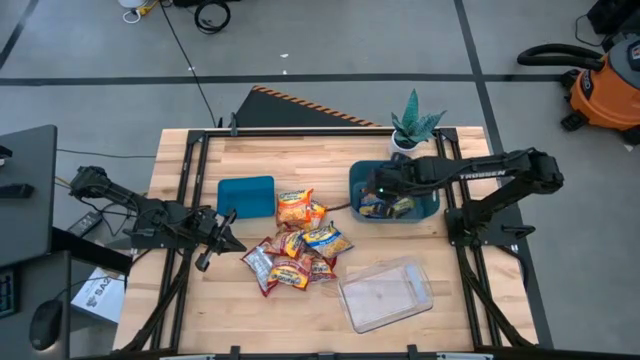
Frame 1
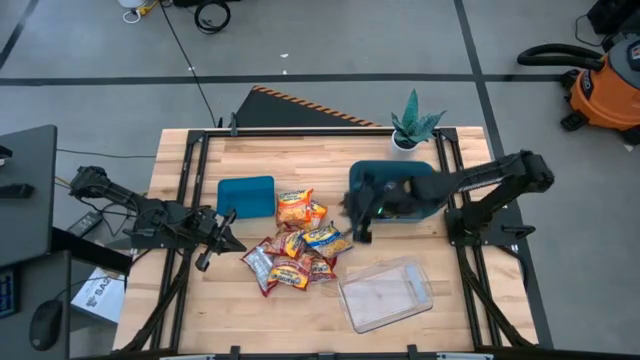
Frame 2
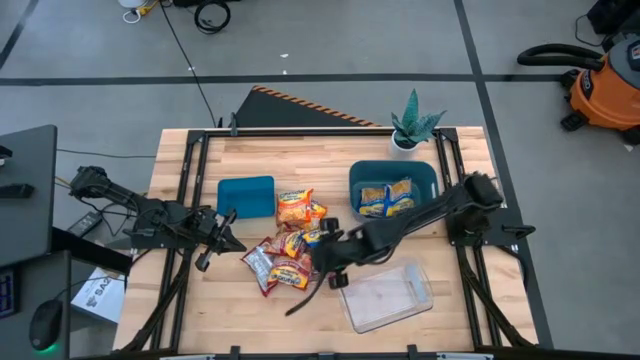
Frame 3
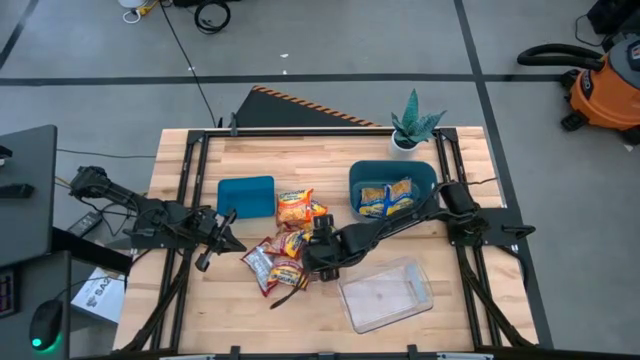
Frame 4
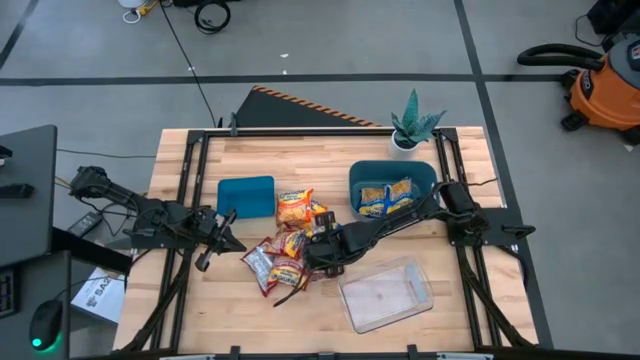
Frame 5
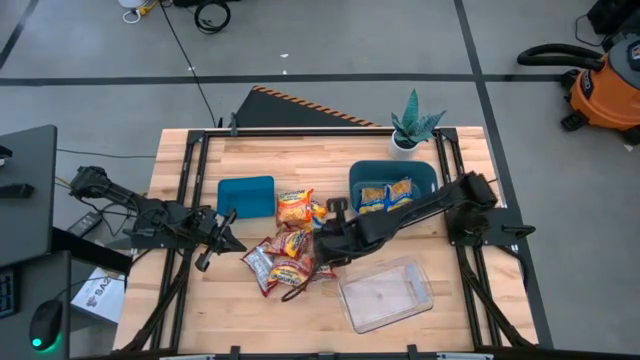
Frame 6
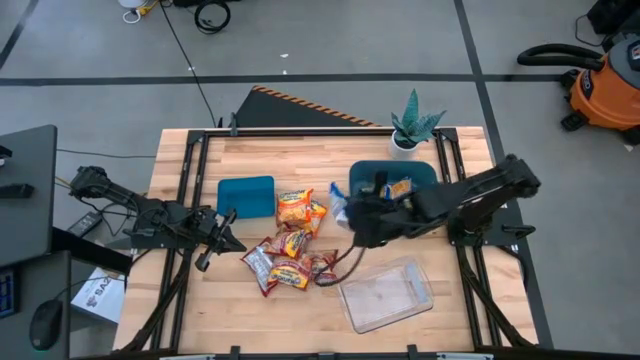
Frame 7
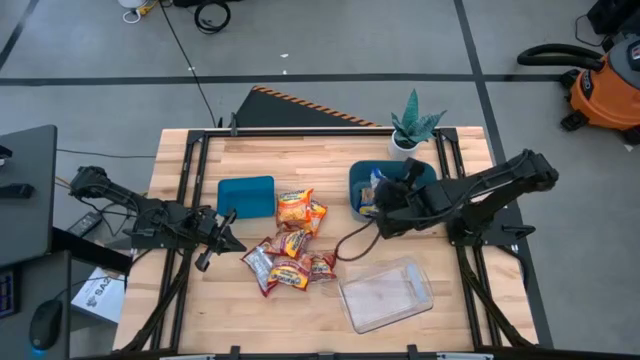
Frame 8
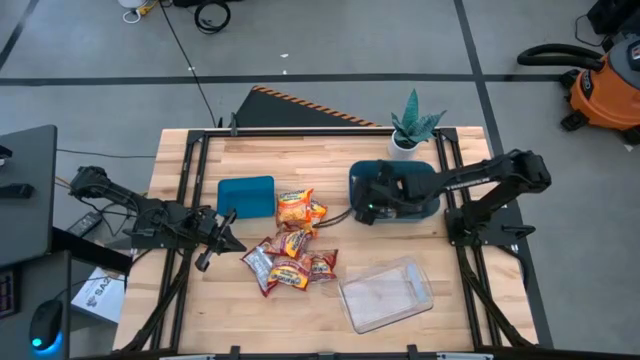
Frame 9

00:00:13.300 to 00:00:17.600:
Task: Sort Maruchan noodles
Put the blue noodle pack into the green bin

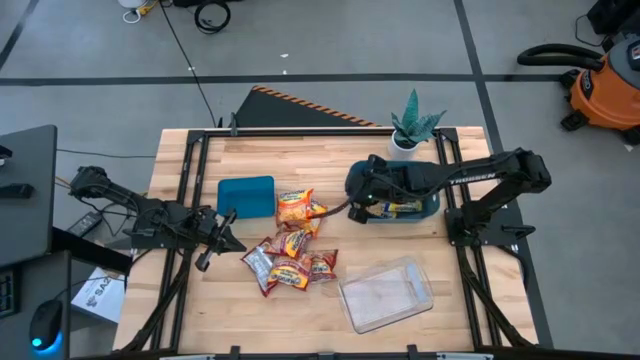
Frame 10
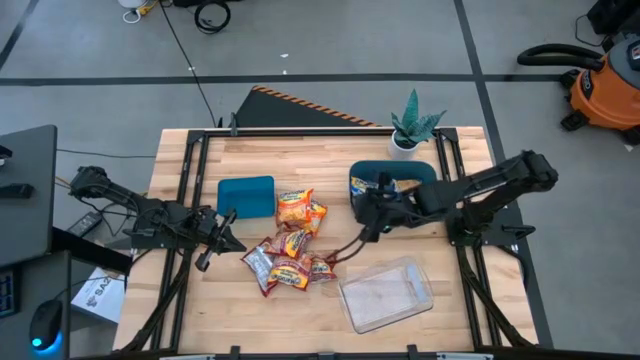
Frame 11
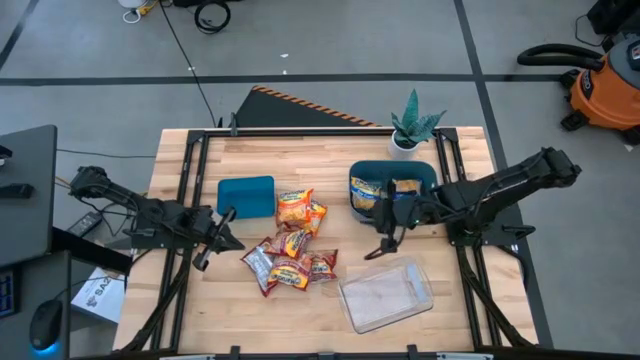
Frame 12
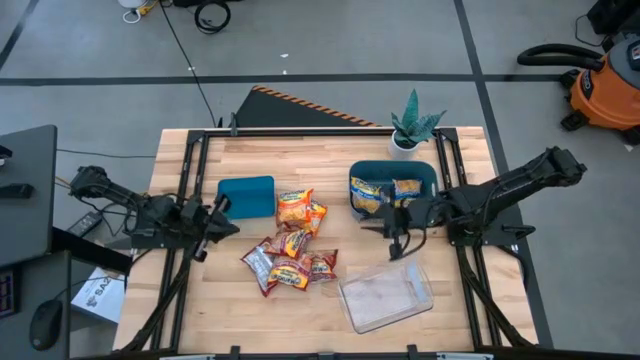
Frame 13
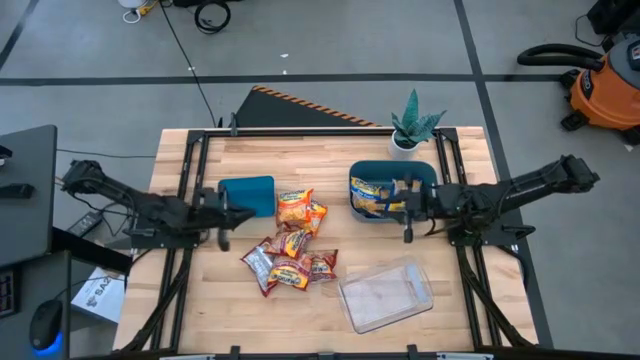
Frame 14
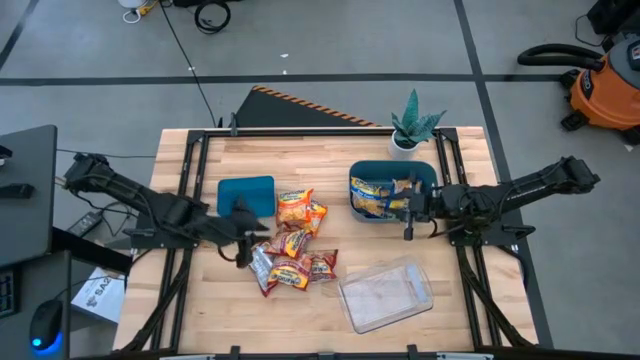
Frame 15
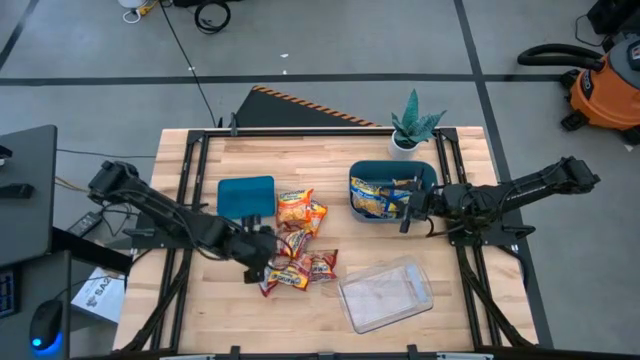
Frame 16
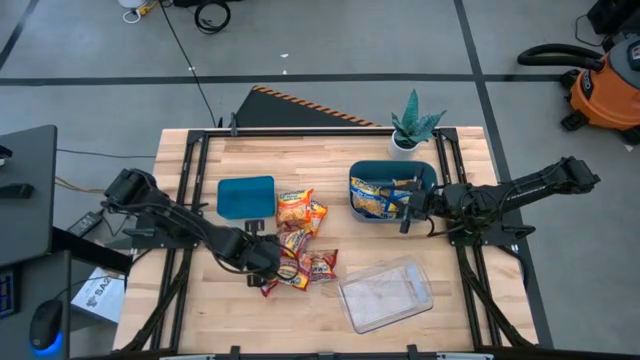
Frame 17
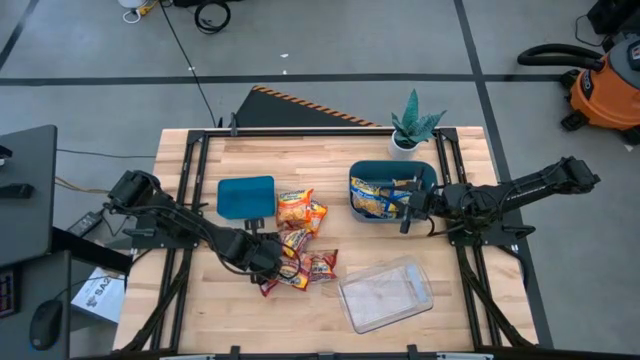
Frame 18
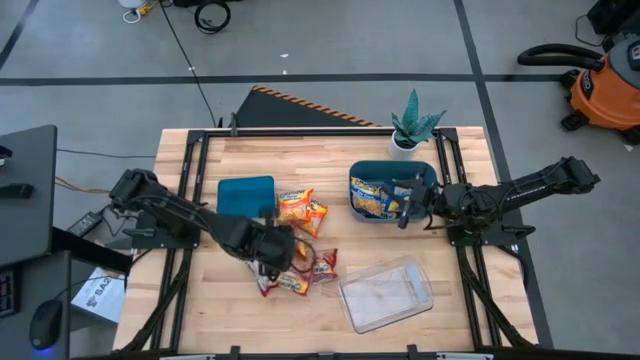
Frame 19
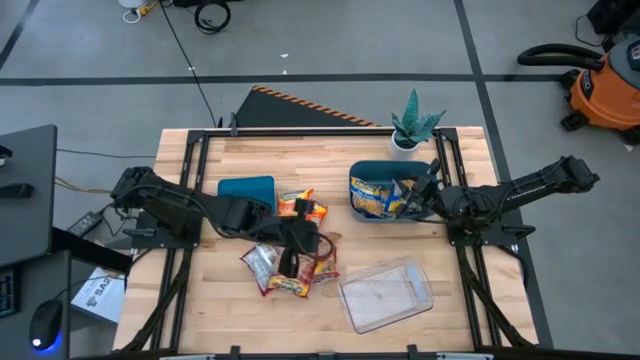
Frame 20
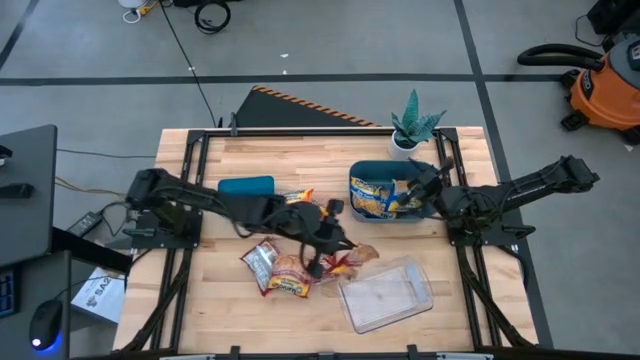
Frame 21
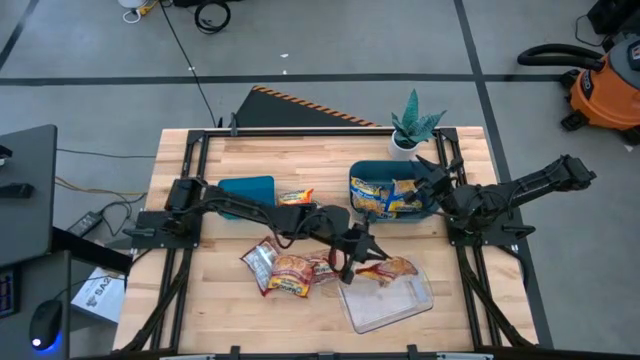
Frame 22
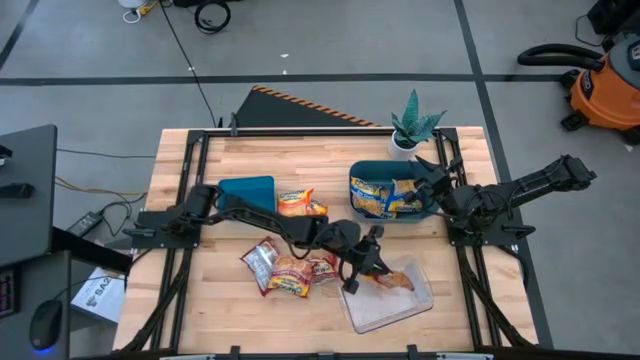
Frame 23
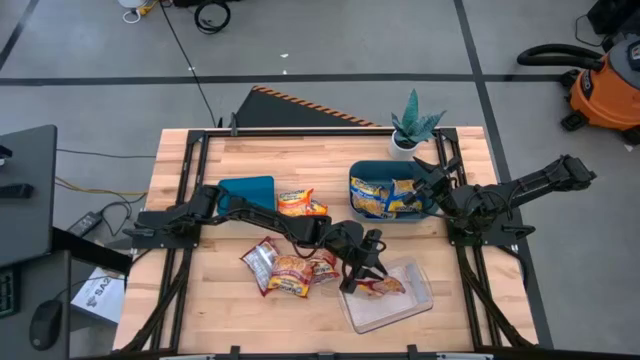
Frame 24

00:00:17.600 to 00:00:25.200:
Put the red noodle pack into the transparent bin

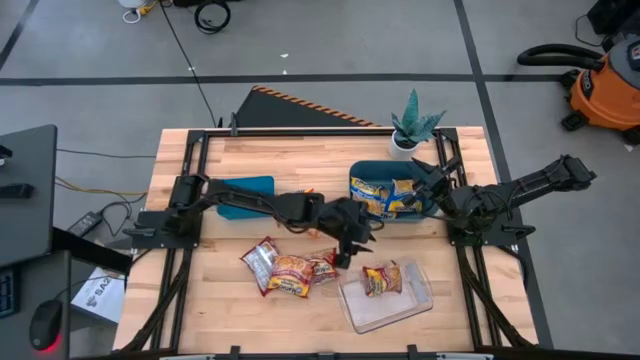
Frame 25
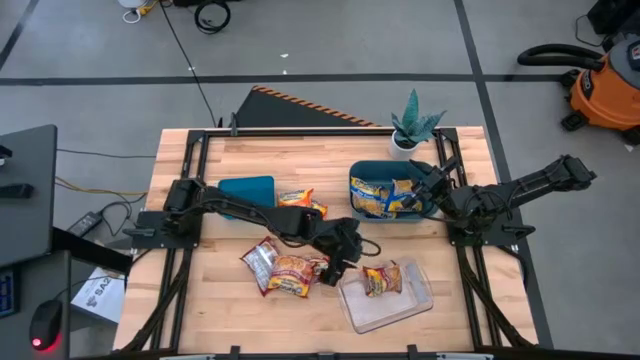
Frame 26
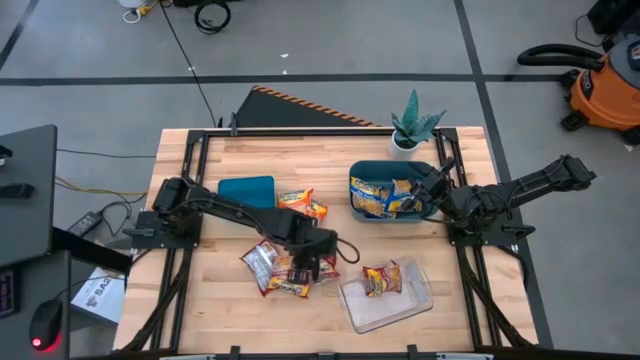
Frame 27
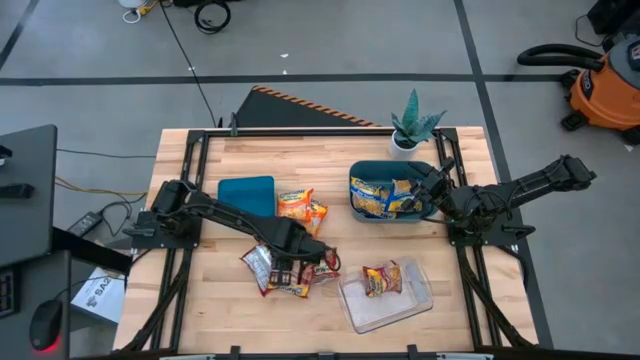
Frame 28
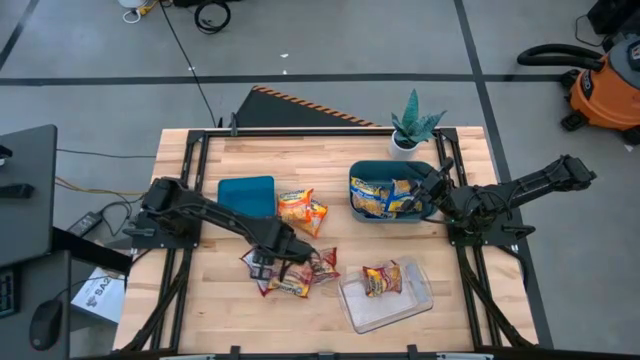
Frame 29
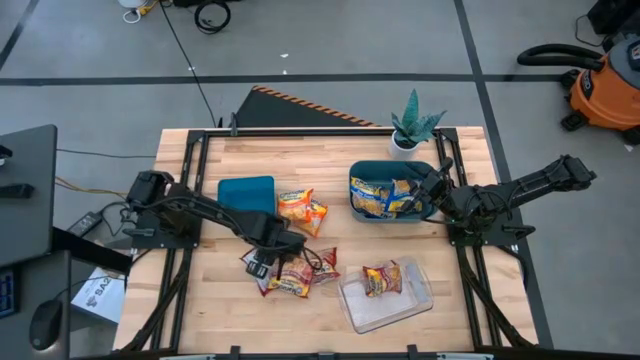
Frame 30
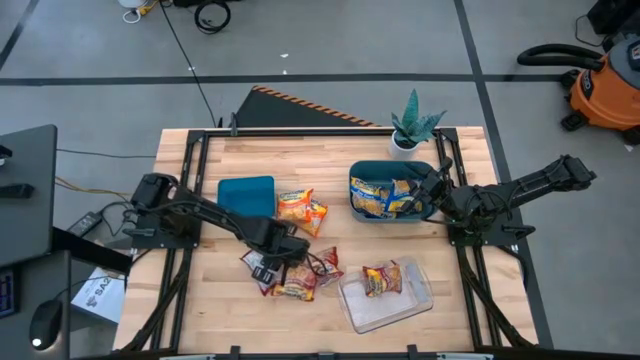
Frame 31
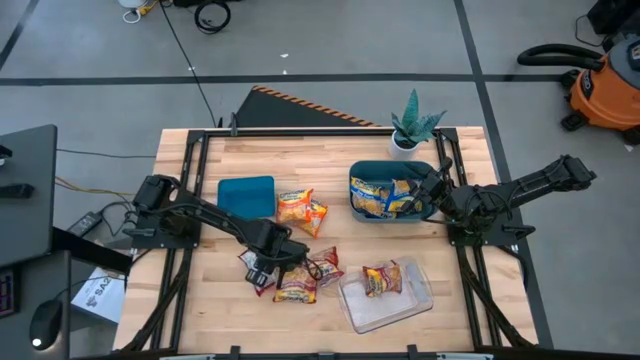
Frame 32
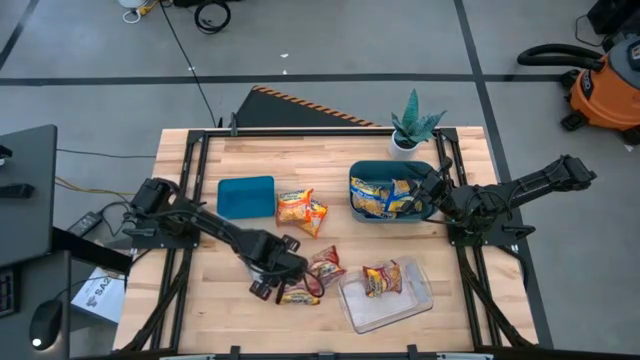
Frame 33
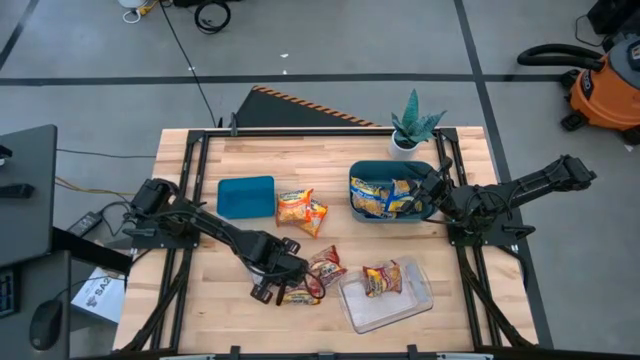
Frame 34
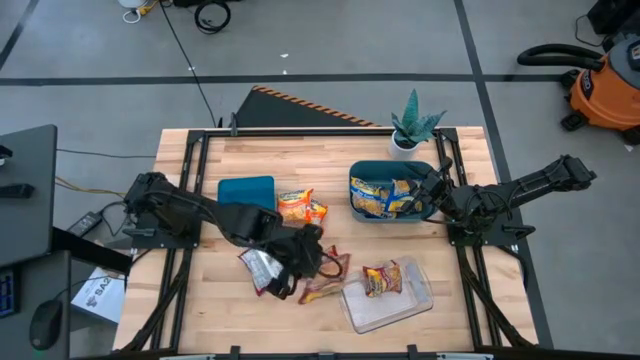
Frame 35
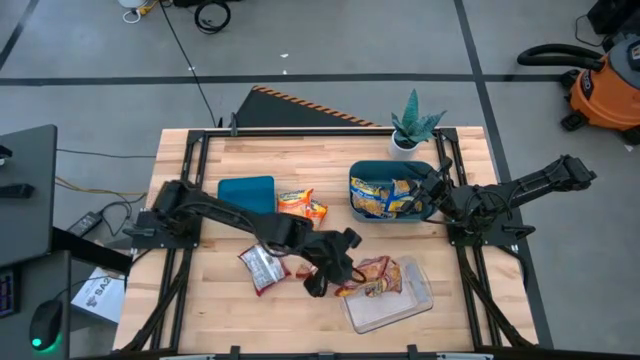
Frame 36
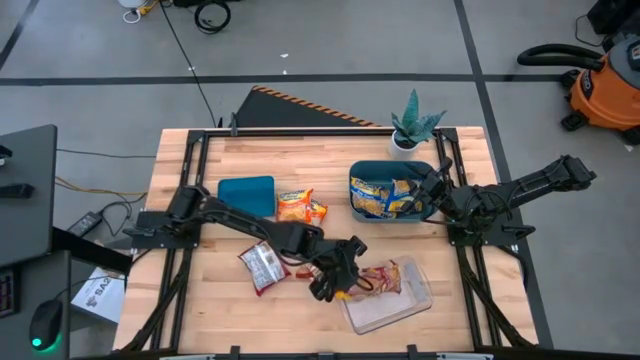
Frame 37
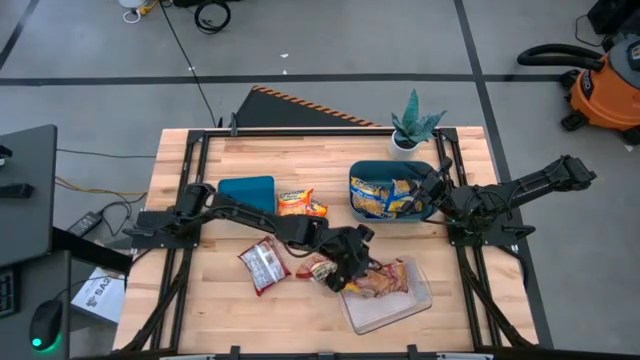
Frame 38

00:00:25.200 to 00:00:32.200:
Put the red noodle pack into the transparent bin

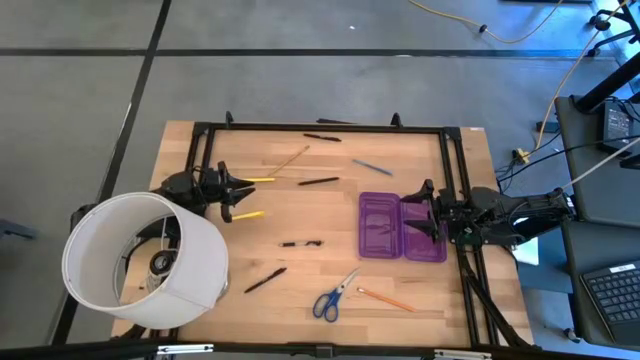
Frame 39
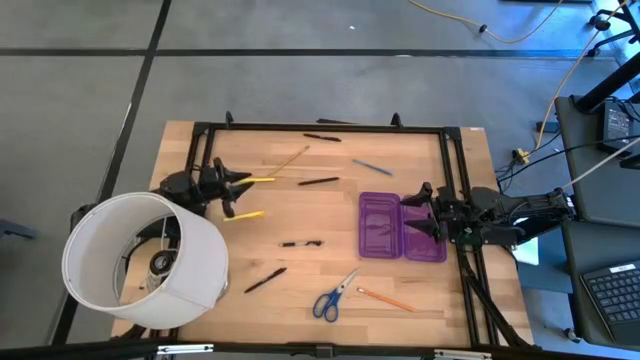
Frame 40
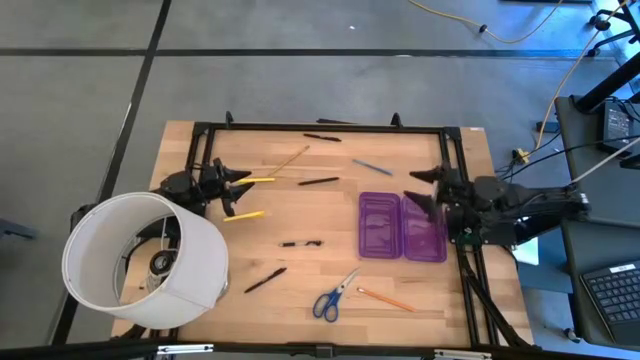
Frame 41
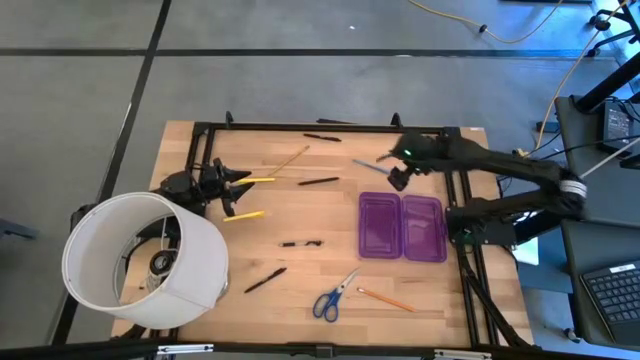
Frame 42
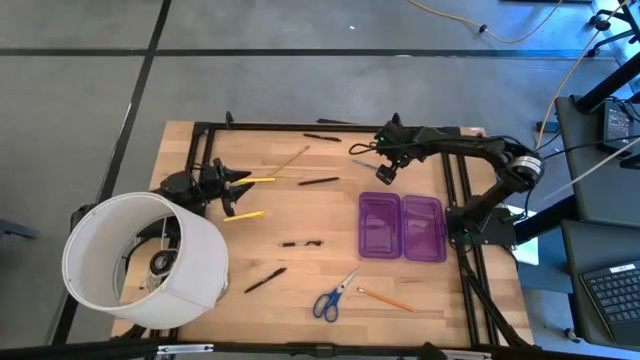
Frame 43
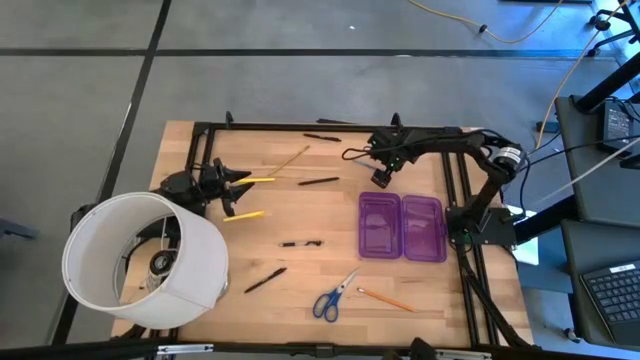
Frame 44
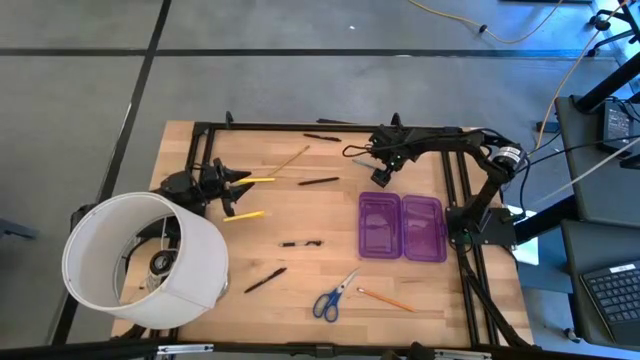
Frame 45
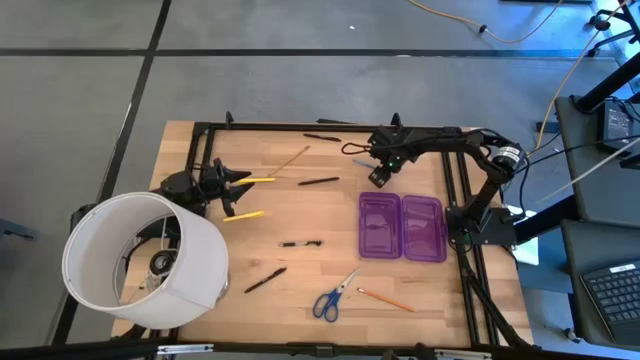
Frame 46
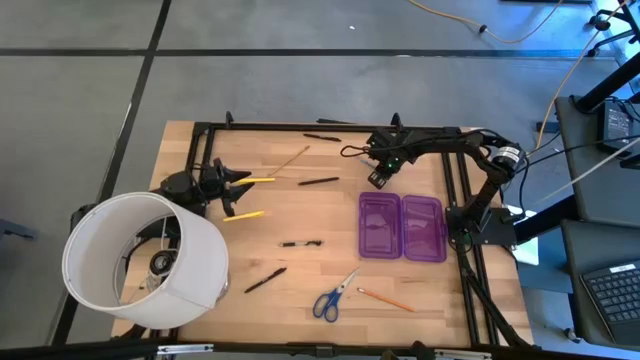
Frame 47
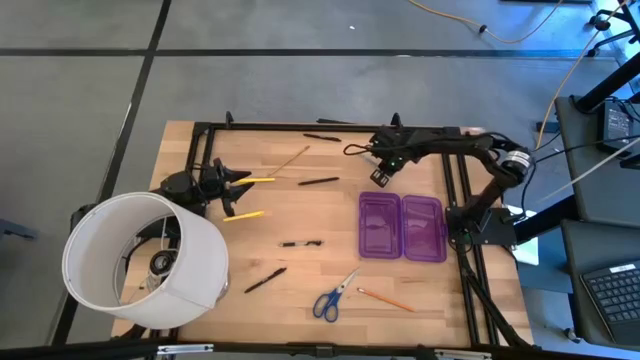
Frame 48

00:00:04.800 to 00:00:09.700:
Task: Pick & place school supplies into a supply box
Put the blue pen into the supply box
